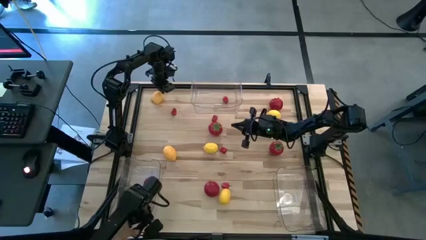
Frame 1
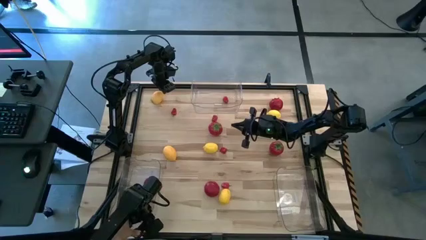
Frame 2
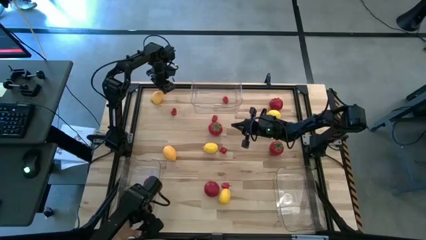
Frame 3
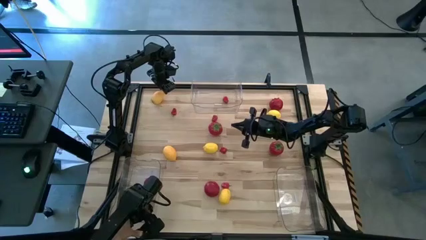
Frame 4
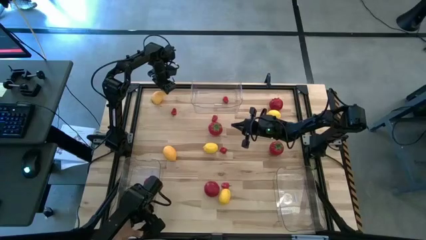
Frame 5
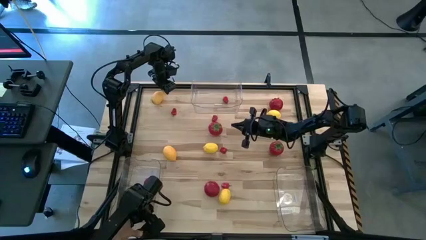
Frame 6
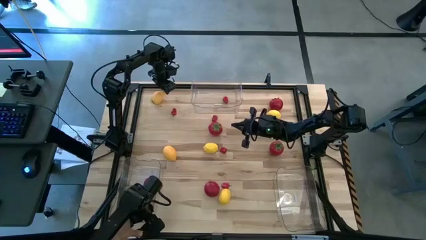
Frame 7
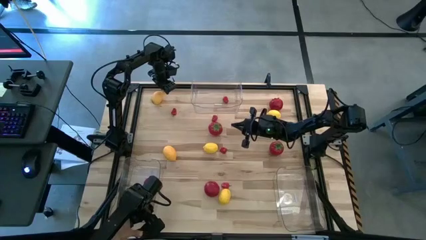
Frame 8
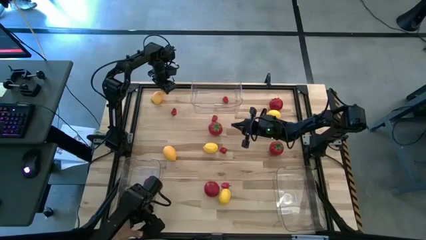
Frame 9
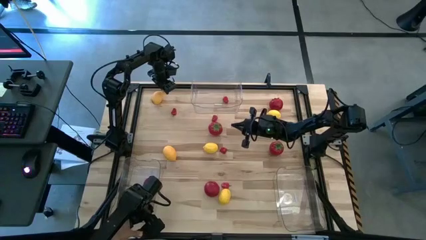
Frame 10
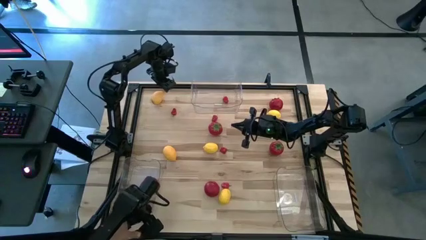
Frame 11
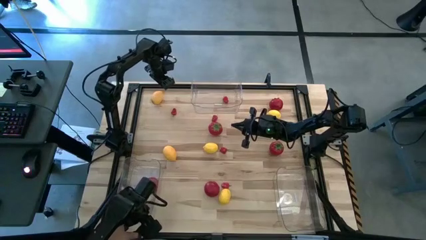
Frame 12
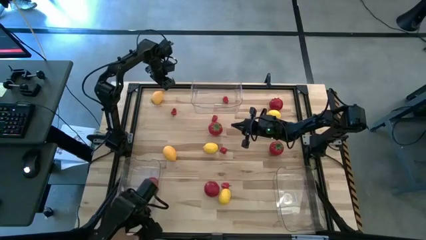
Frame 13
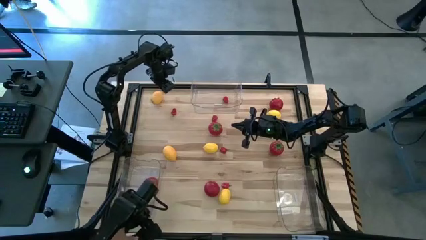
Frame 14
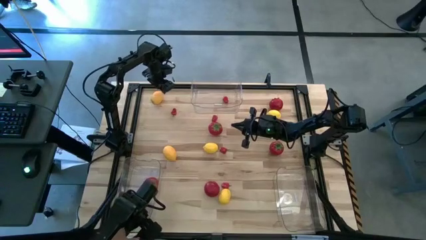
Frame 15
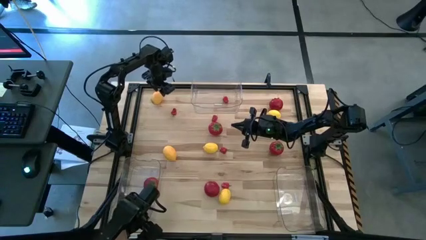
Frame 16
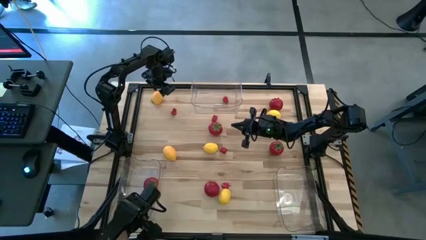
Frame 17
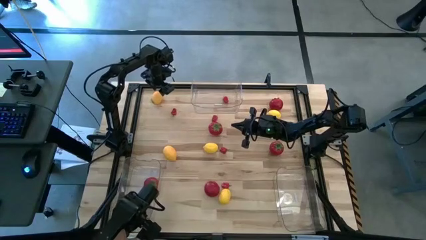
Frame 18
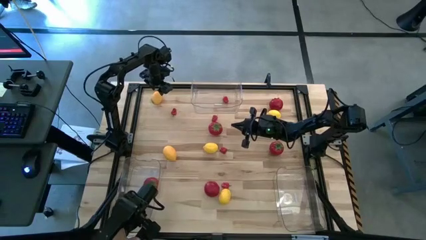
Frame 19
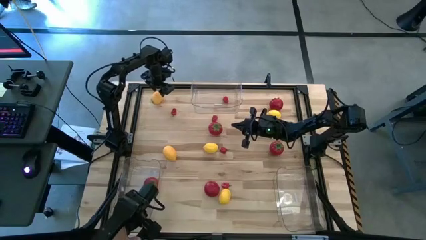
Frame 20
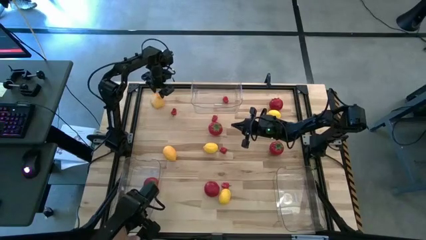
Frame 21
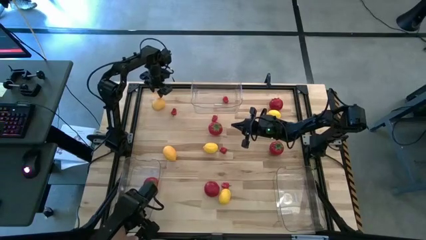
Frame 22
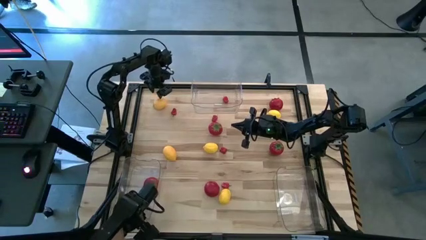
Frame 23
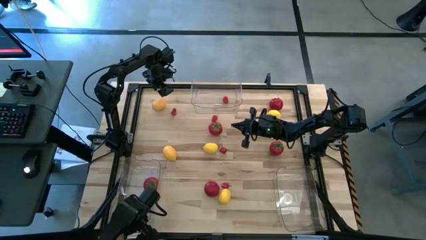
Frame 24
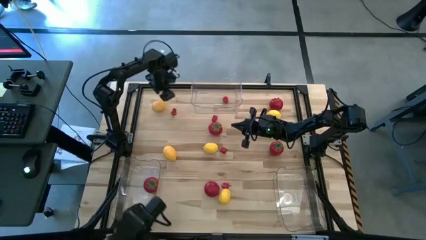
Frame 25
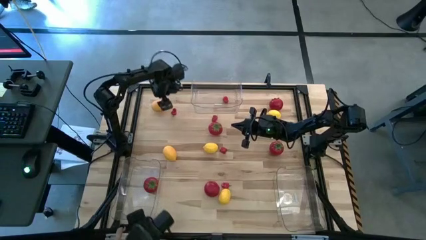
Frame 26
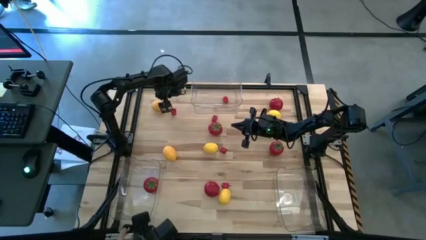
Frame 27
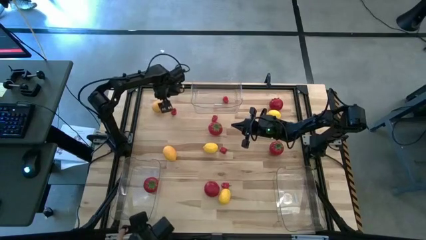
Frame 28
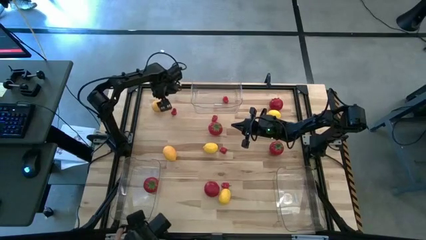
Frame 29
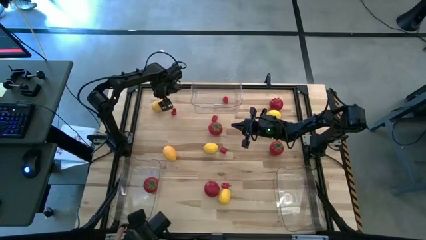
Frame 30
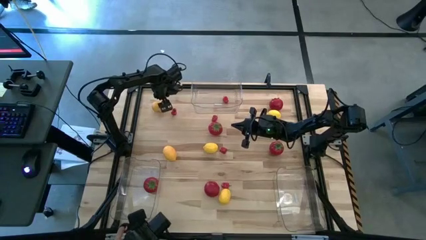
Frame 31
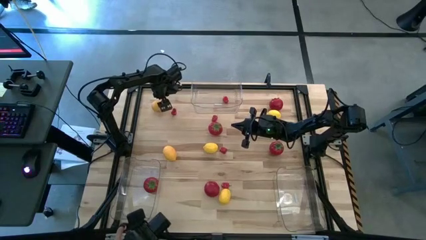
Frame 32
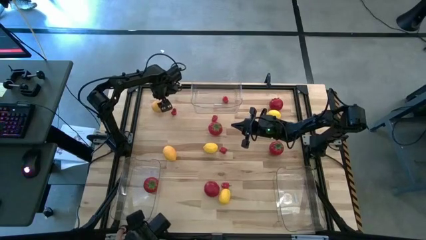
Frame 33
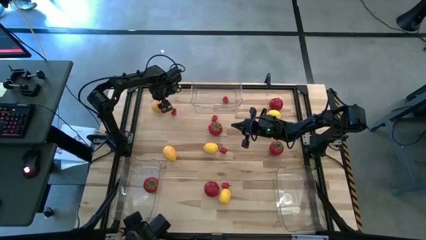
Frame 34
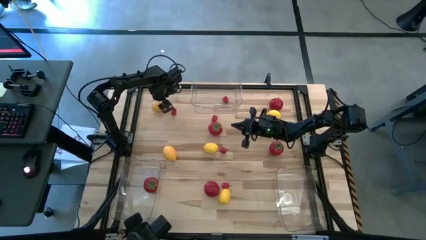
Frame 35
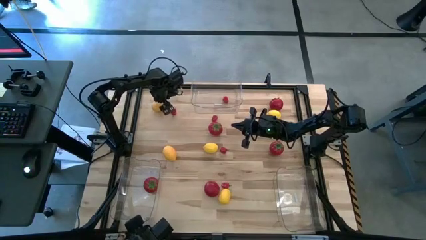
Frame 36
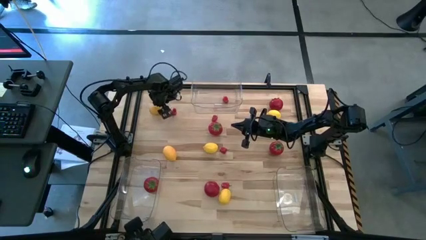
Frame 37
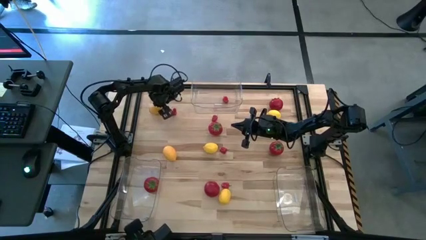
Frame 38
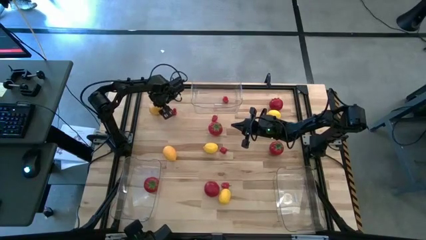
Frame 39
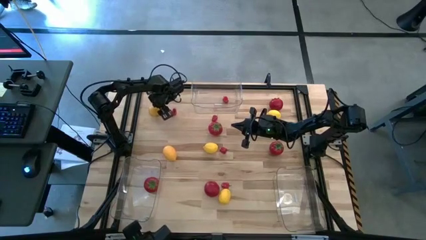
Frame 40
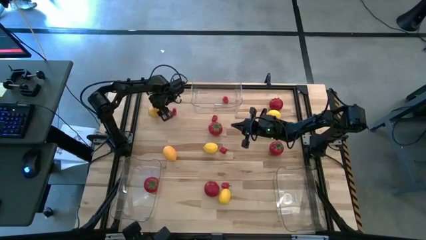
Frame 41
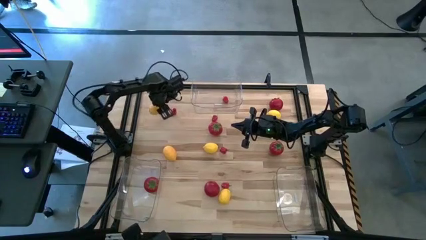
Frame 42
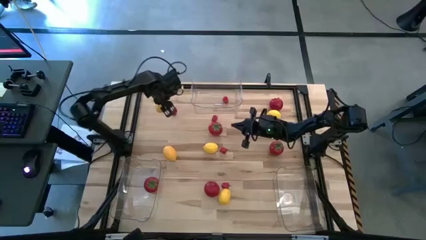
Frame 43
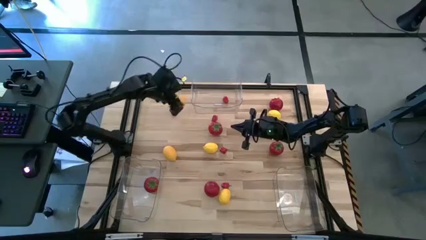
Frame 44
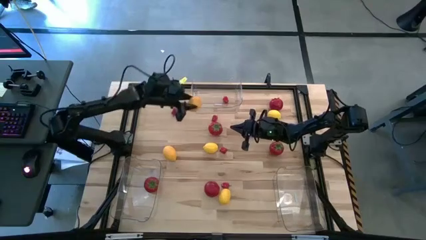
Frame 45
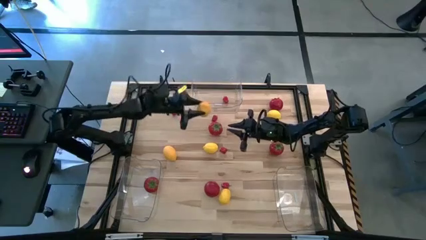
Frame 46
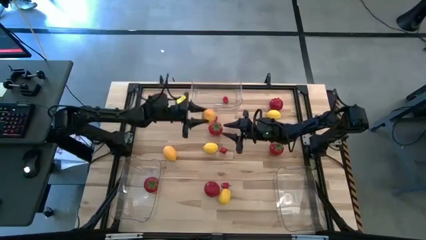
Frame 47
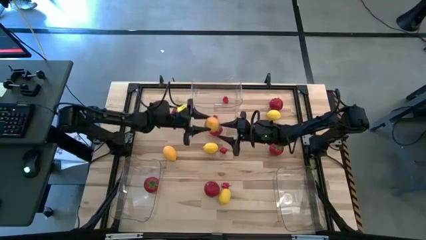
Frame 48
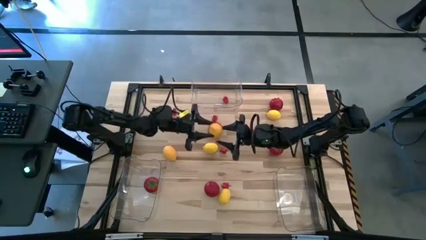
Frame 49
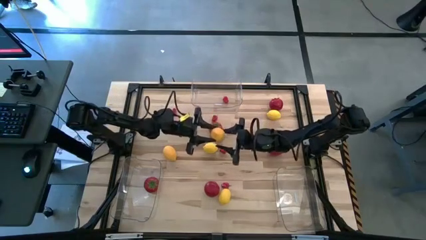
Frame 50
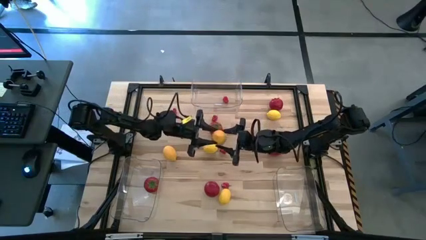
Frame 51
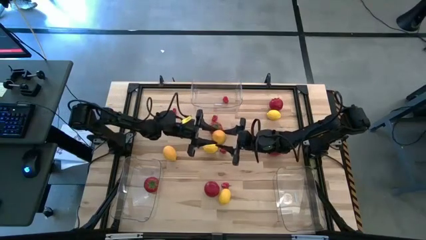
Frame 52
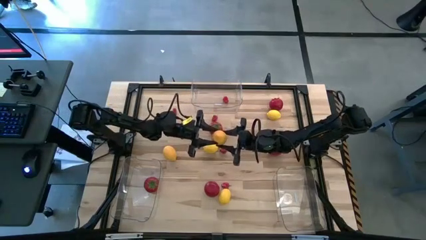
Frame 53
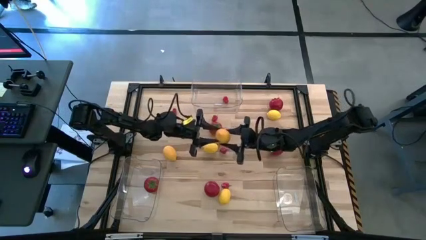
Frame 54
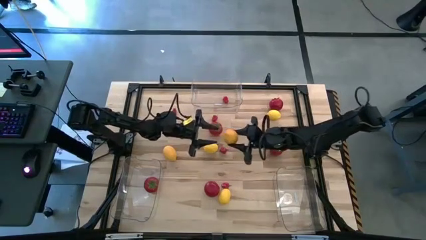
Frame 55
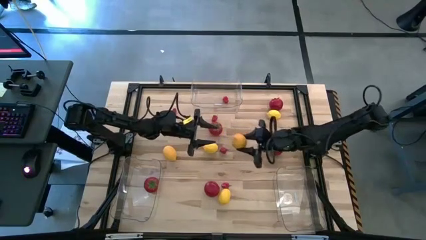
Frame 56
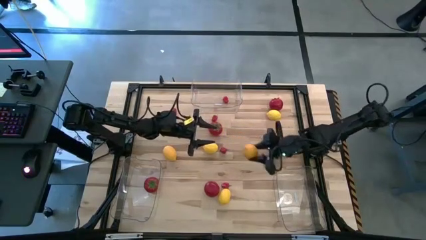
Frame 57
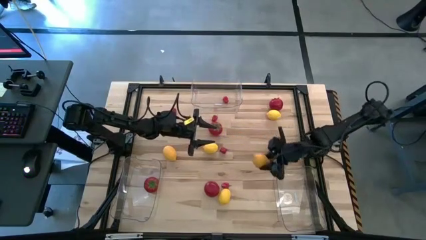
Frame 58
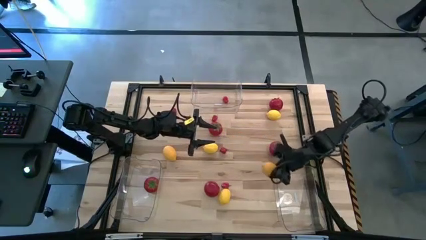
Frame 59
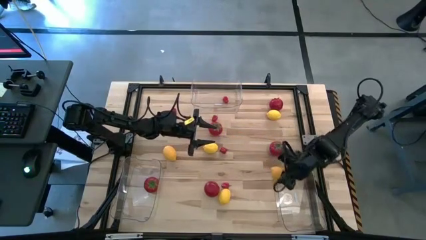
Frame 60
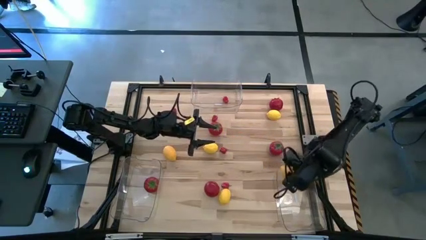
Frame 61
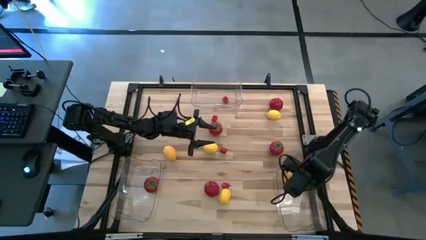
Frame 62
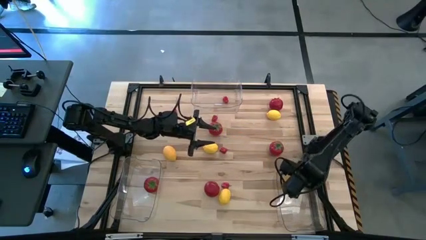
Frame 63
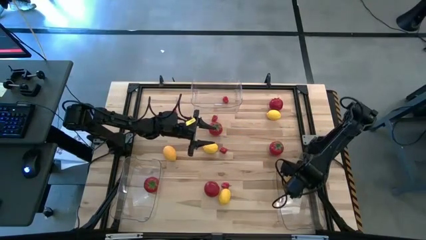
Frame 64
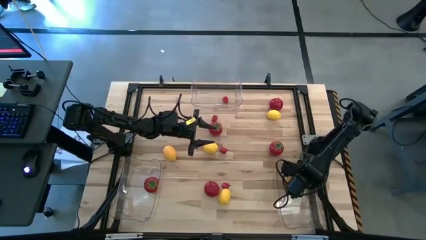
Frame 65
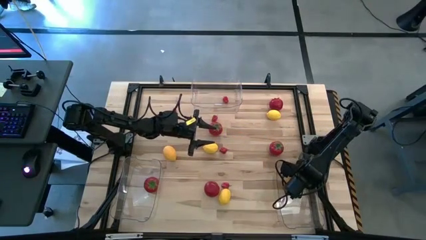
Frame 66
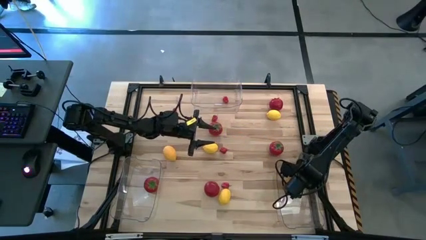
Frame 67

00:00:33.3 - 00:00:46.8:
Task: Sort produce into baskets
Put the yellow lemon into the bottom right transparent bin

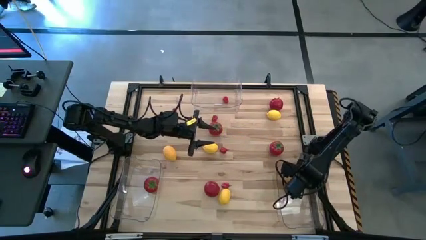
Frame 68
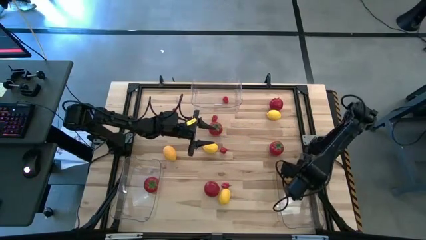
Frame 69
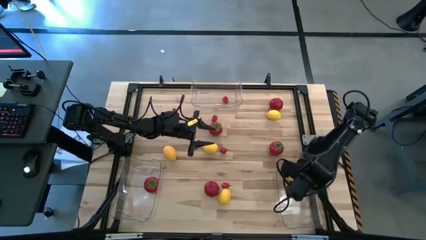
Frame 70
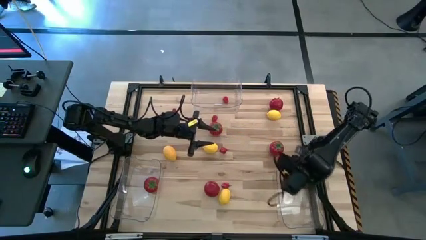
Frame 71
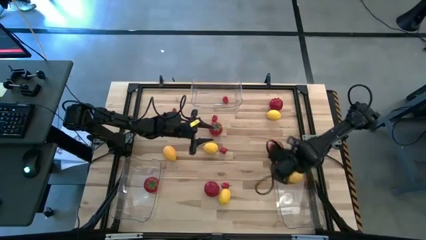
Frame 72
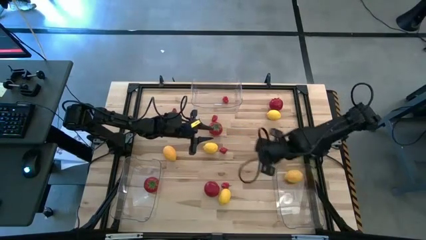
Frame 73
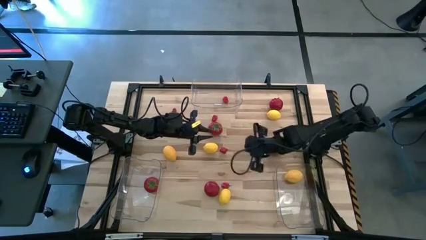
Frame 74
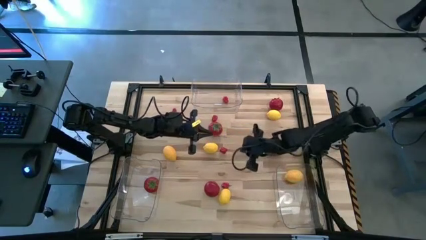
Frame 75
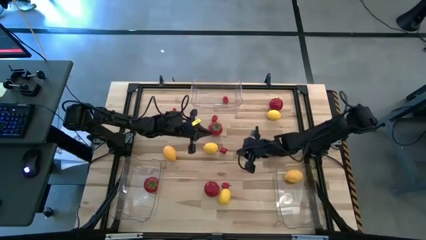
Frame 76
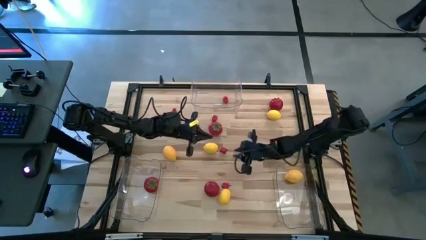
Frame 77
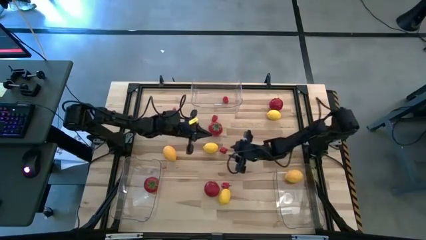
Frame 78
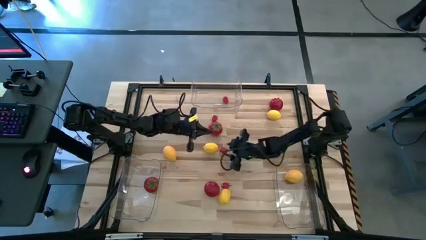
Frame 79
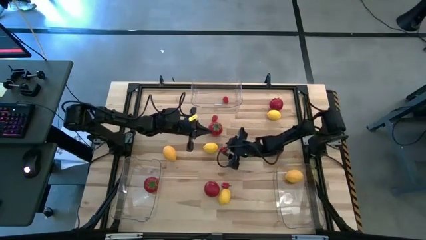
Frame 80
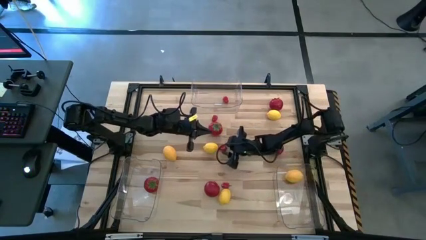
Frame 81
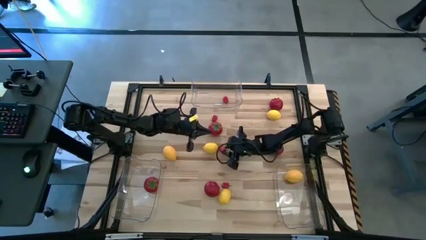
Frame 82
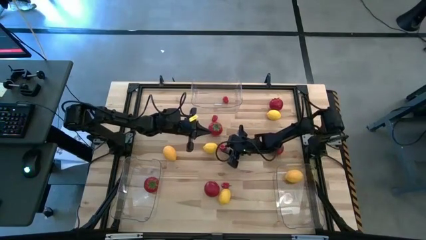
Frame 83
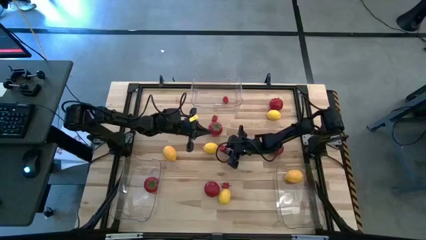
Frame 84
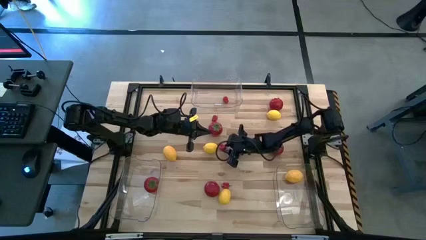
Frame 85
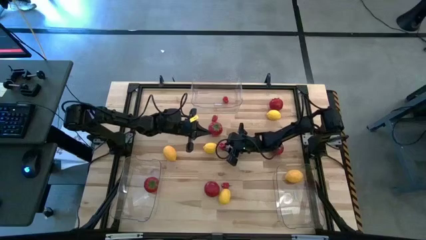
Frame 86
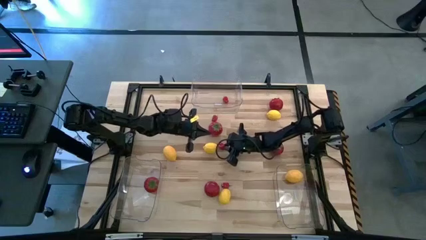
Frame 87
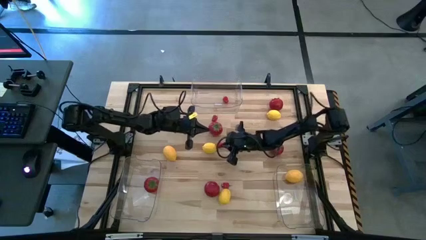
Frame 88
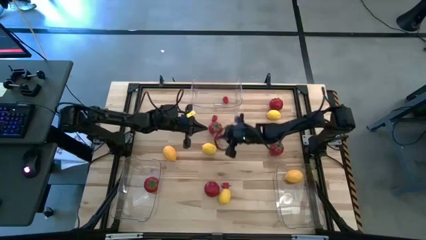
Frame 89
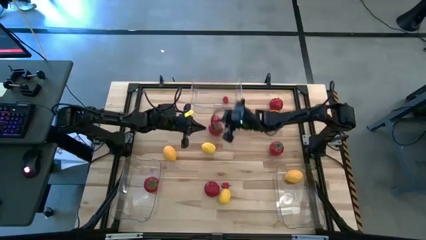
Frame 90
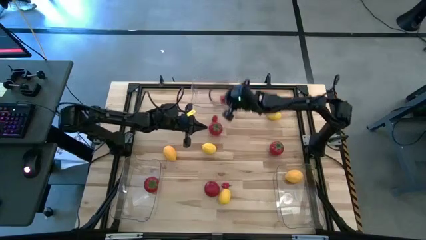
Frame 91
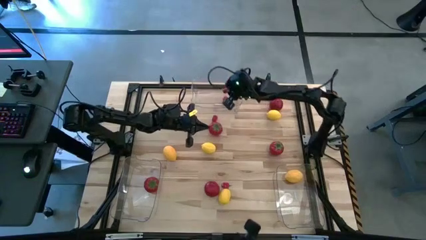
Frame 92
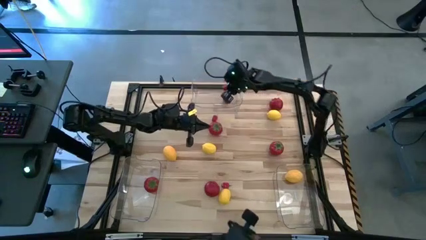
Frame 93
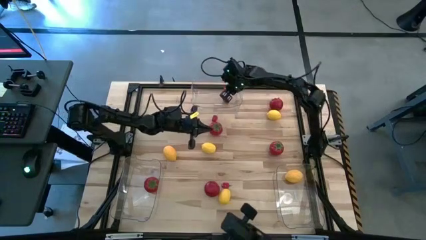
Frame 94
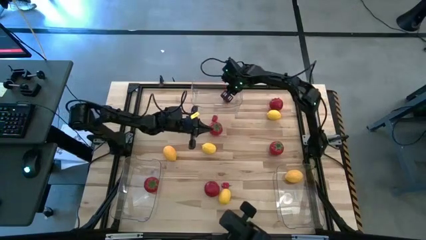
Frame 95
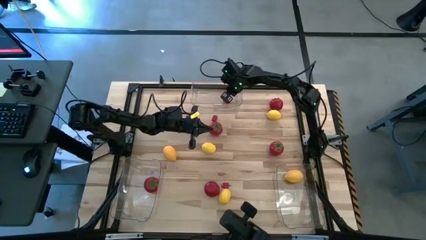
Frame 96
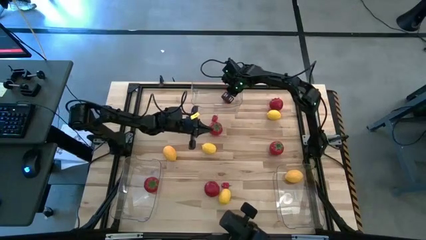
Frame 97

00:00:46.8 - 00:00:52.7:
Put the red chili pepper into the top center transparent bin
